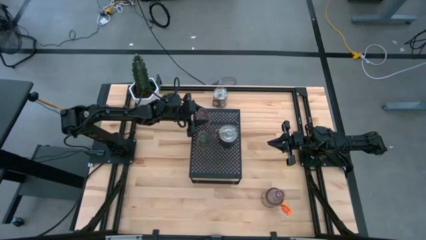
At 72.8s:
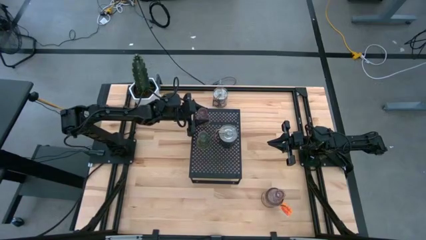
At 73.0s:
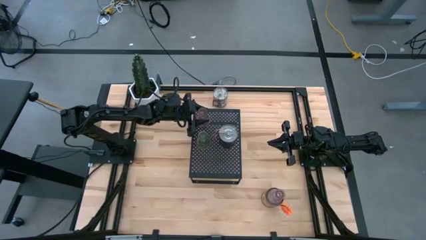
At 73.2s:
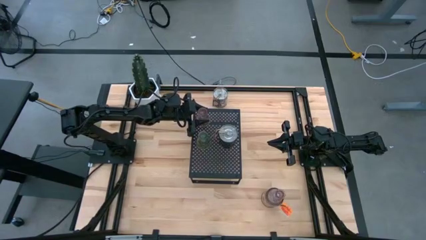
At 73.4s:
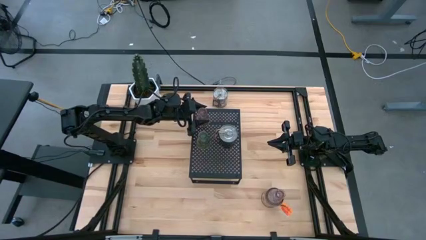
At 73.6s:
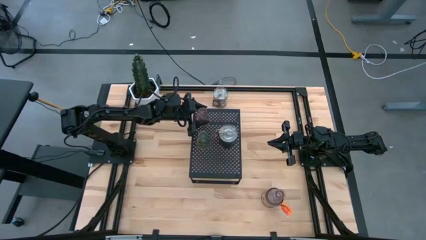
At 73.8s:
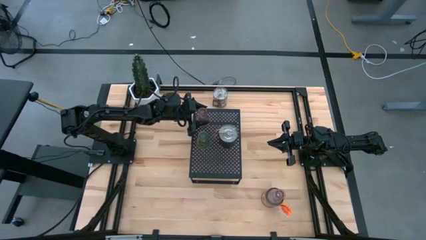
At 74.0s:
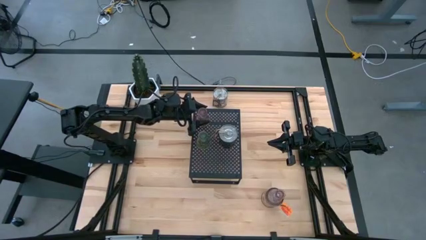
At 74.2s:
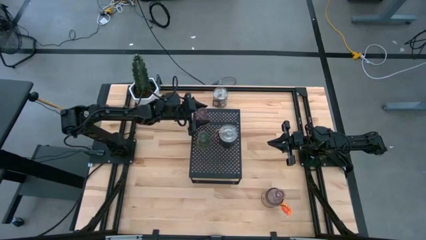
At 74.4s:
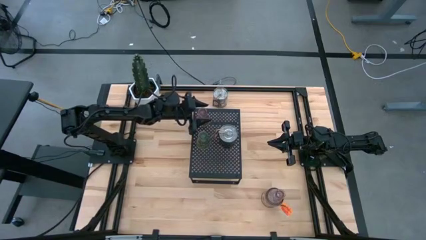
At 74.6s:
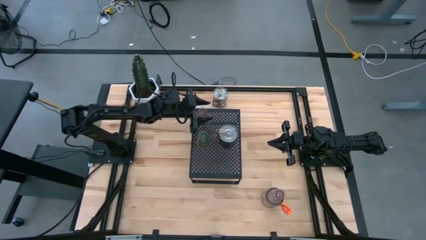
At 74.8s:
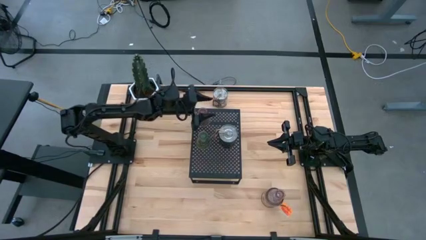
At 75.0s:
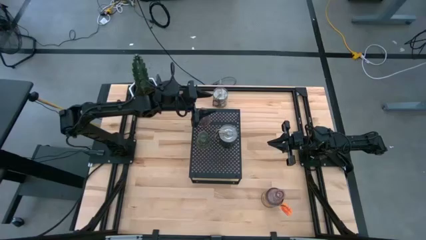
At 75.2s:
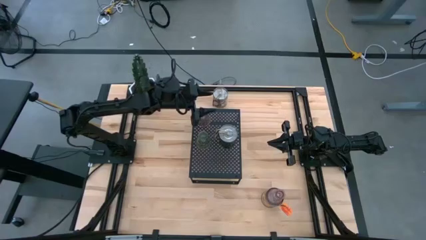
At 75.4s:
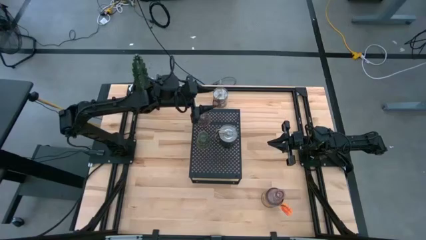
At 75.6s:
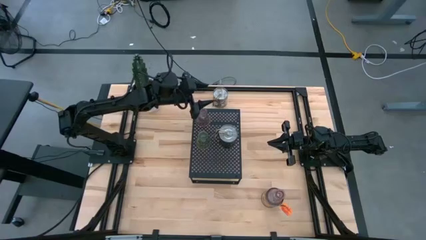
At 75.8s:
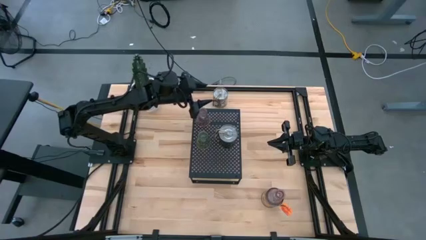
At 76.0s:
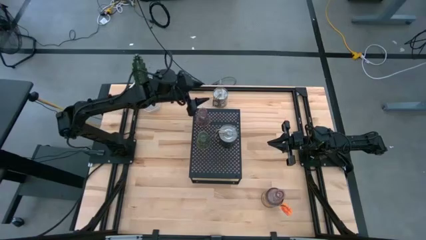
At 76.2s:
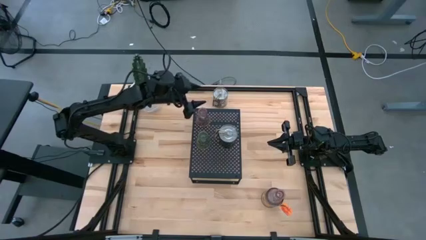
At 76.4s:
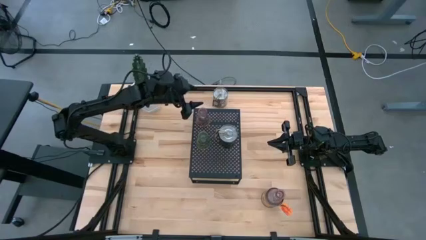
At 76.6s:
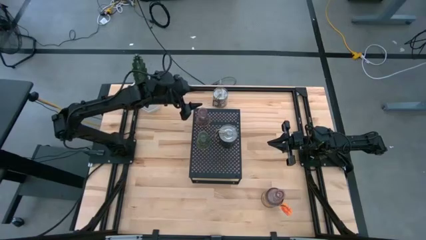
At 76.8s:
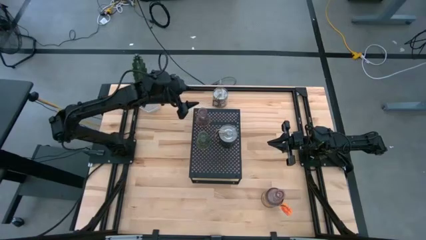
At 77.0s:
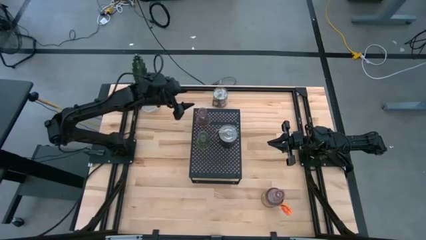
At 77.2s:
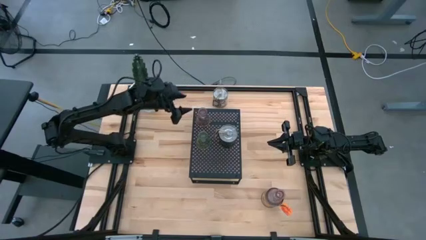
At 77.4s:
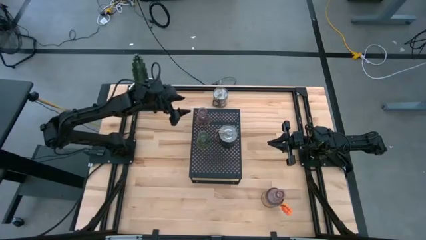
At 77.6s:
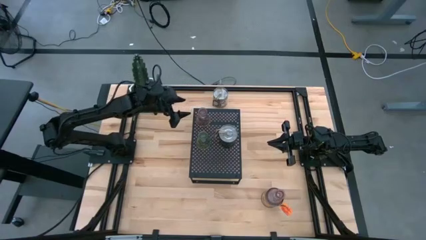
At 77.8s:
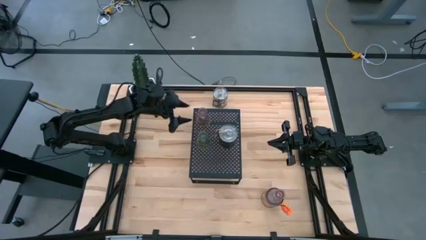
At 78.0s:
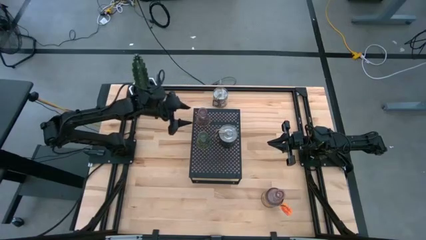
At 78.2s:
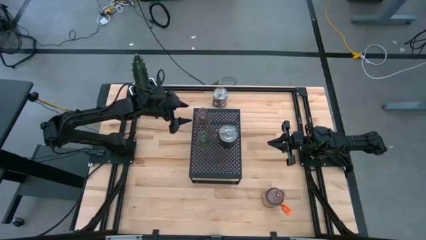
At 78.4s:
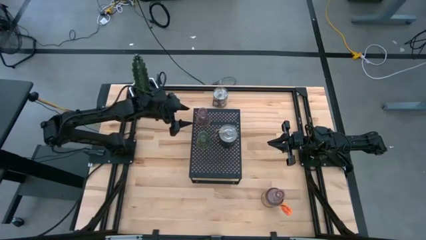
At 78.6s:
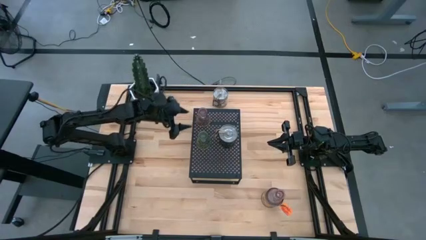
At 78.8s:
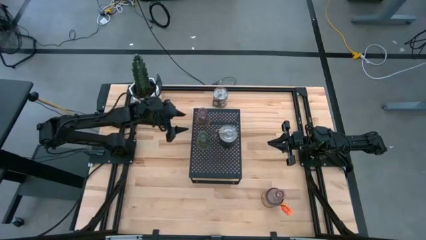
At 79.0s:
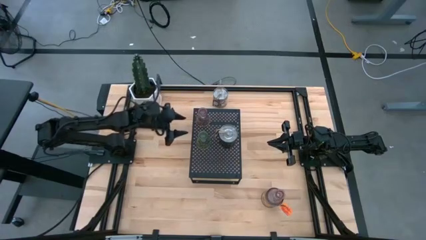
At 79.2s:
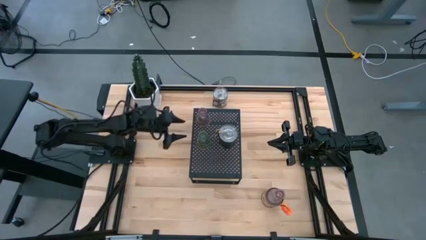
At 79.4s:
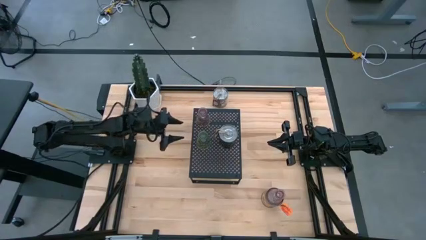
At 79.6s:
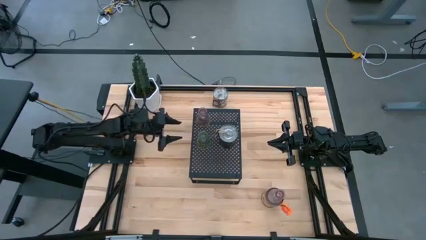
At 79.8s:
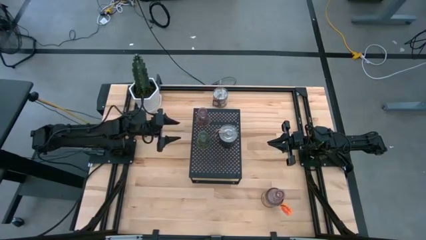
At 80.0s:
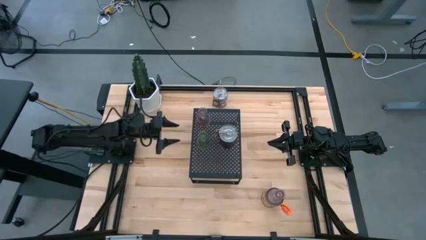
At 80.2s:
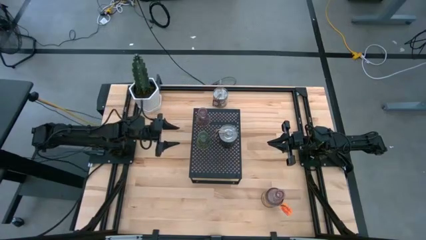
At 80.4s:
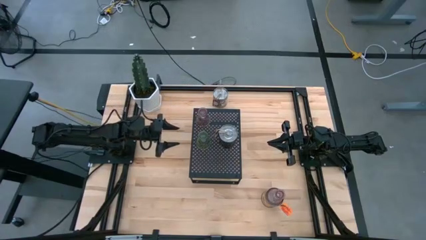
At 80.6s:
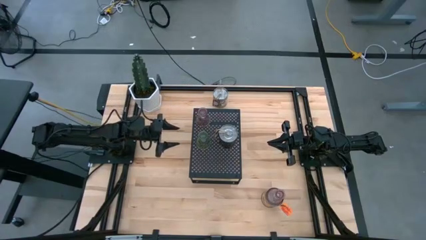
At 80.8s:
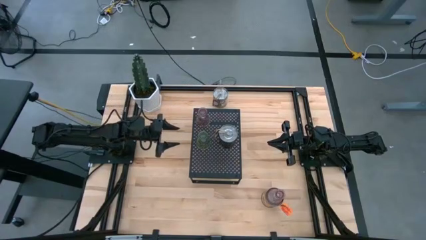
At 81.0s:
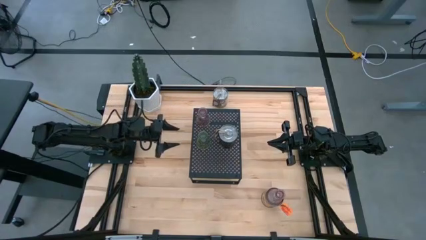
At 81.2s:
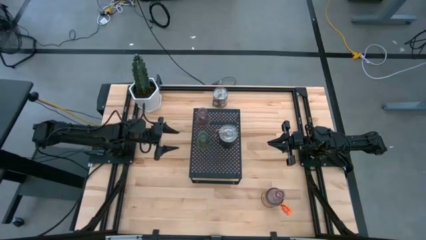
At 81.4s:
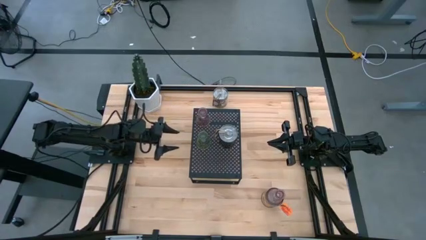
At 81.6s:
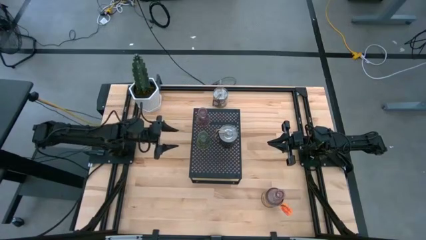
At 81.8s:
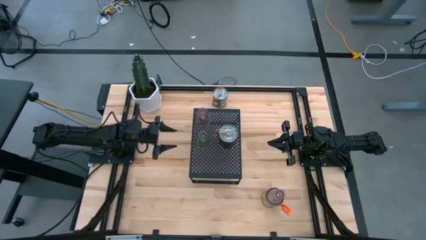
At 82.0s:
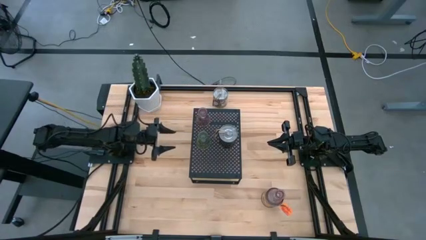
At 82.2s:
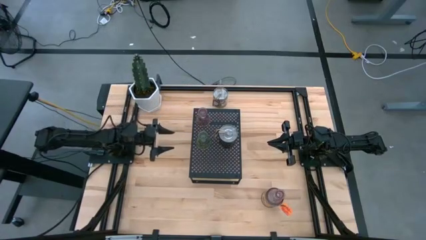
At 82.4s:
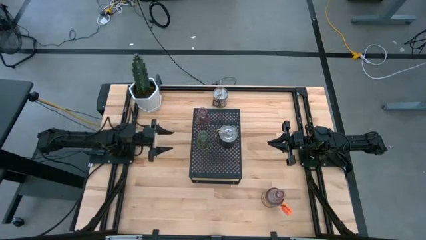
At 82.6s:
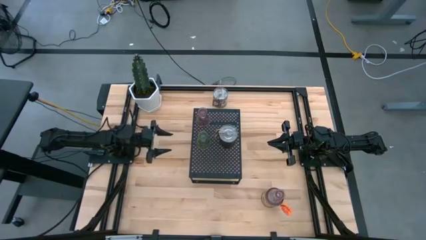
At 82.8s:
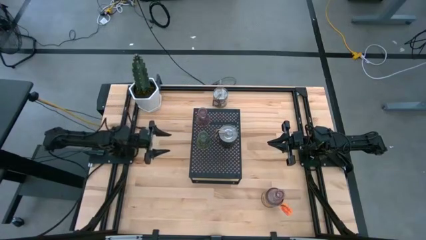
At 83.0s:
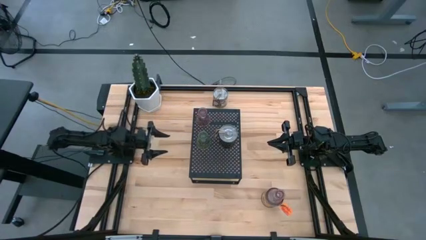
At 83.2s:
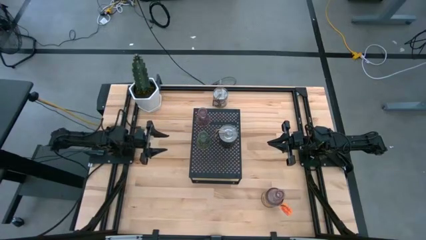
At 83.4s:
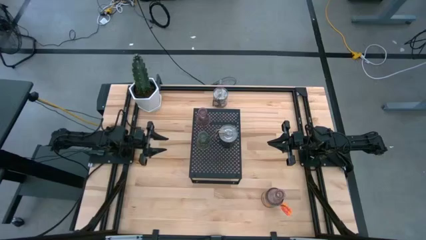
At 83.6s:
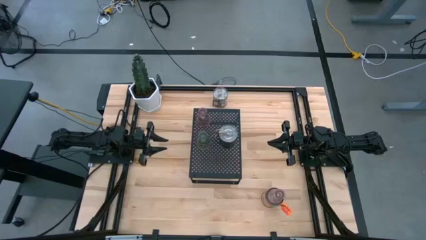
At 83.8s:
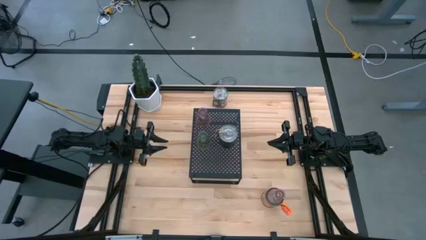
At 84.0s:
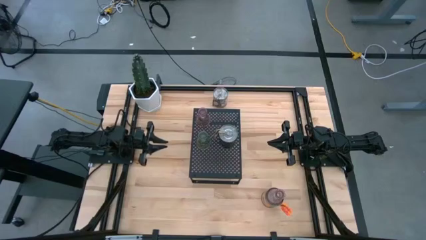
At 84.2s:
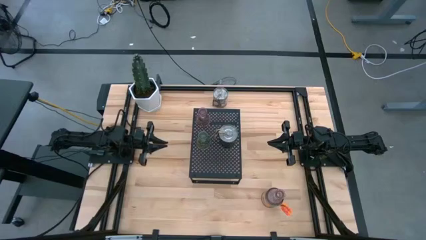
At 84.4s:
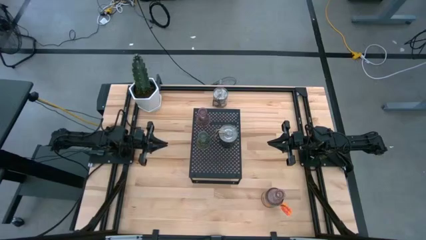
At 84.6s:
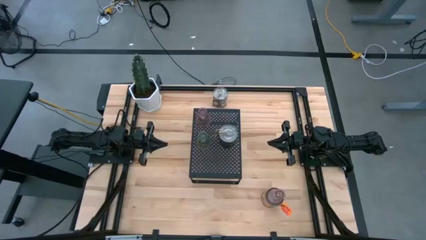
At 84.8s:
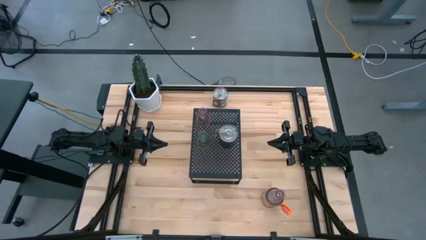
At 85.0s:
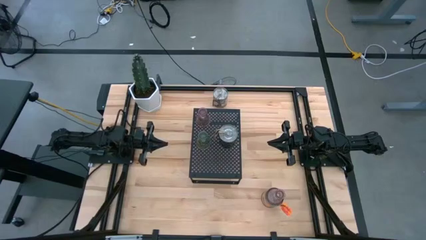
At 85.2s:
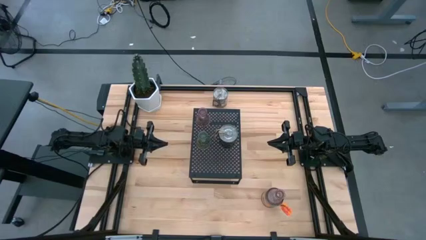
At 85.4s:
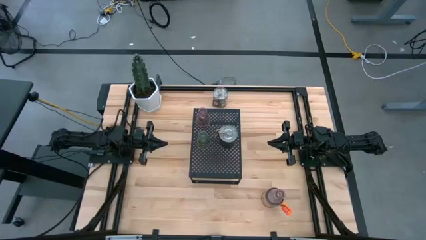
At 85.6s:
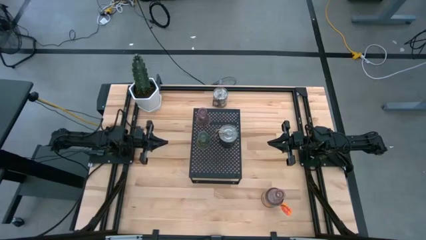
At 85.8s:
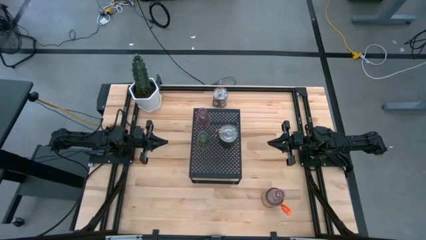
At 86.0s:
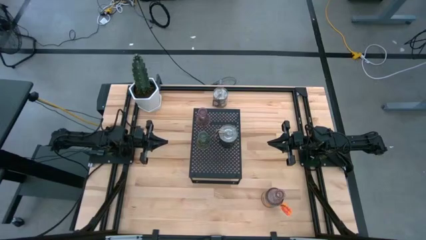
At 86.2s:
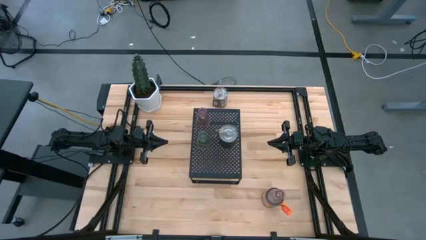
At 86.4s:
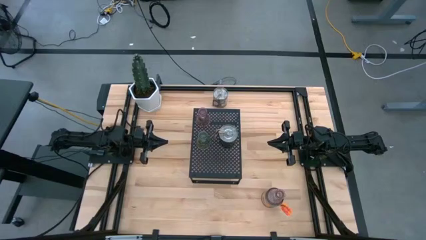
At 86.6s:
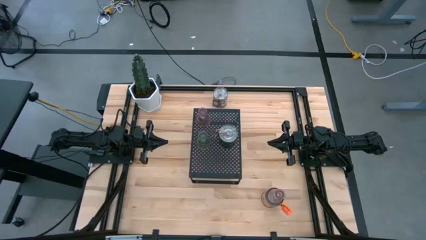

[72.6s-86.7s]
Task: Pick & Place candle stick holders
Put the pink candle vase on the shelf

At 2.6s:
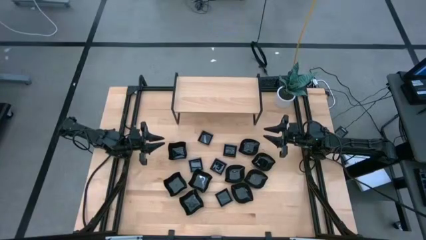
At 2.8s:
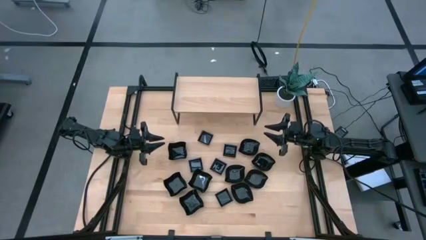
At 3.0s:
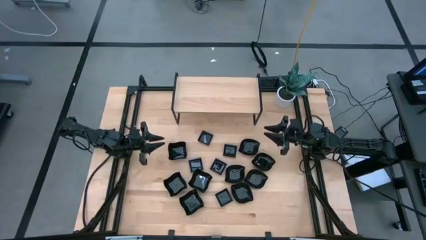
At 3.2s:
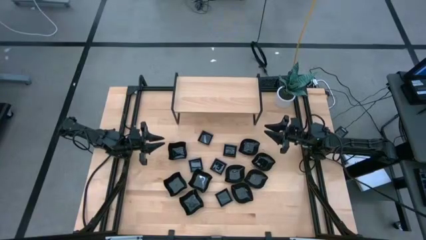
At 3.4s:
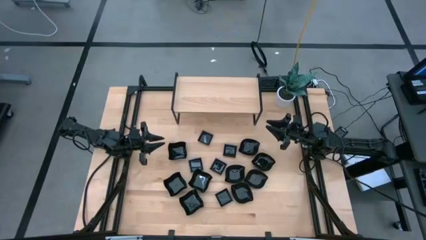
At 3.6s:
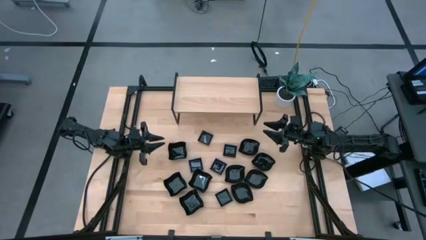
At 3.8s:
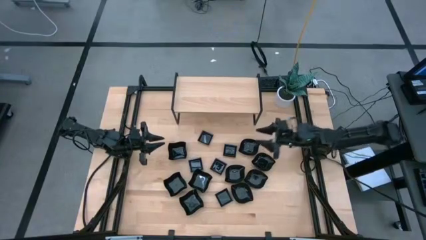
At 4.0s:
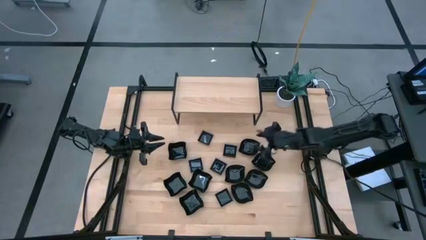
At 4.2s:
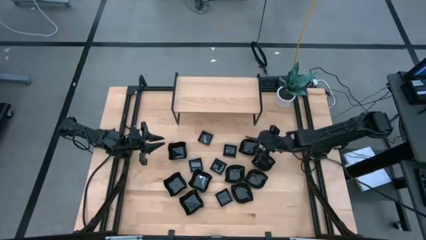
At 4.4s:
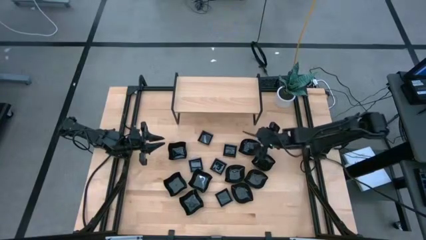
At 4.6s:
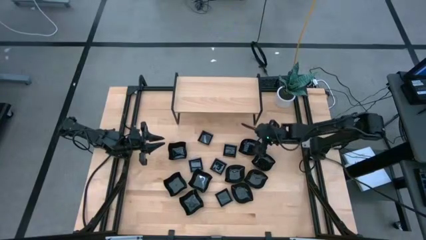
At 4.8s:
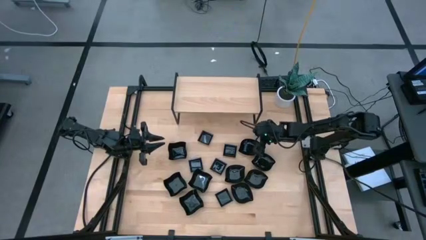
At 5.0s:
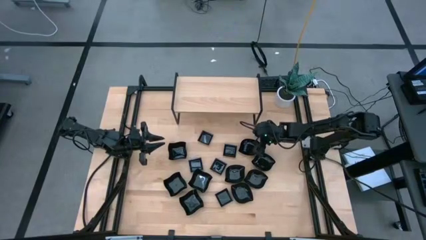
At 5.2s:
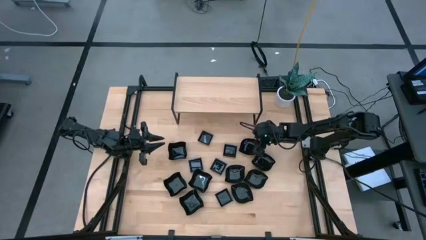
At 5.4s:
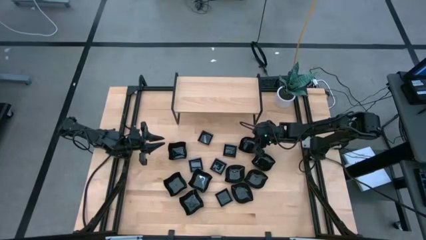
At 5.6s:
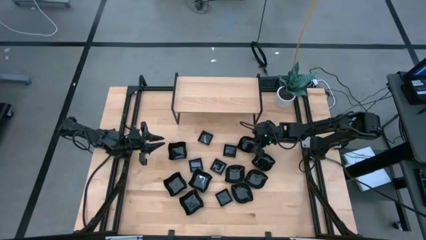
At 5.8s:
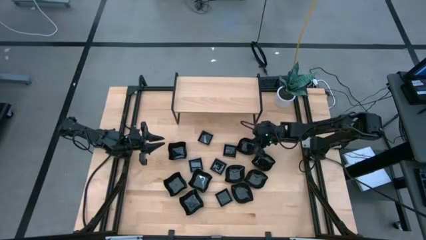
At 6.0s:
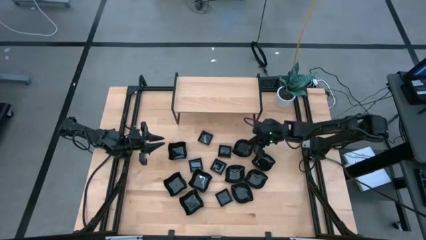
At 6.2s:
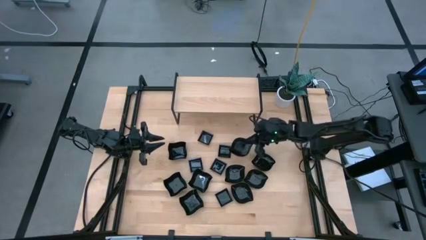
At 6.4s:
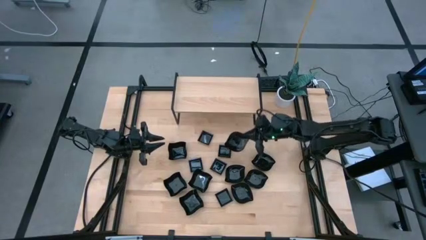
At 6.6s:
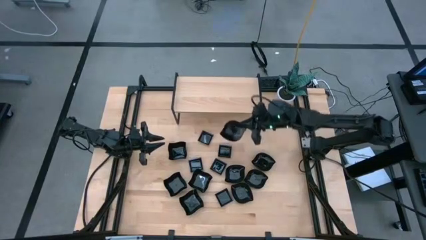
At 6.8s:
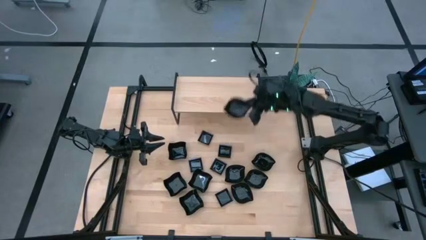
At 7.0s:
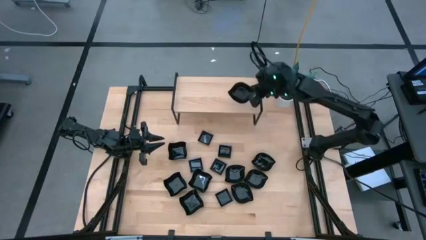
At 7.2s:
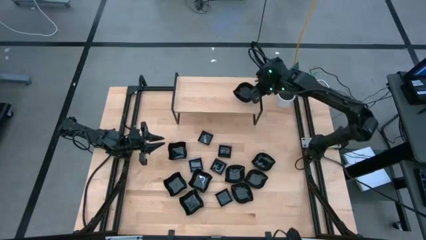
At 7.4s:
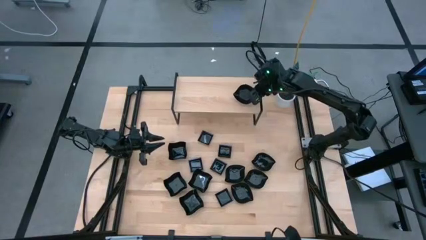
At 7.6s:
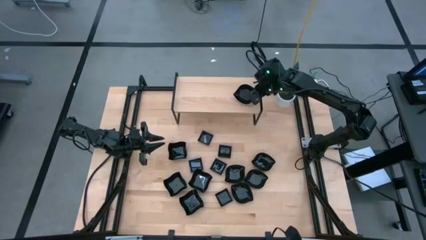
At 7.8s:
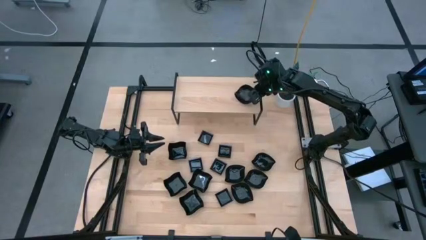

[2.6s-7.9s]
Task: Pick & Place Mini shaped plates
Put the leaf-shaped plate on the shelf
